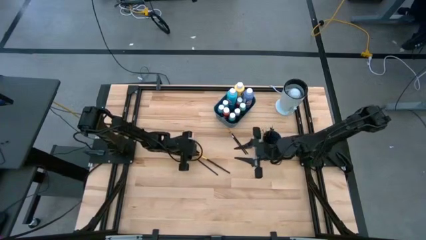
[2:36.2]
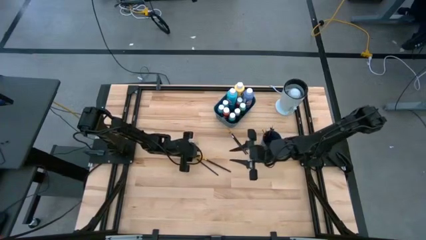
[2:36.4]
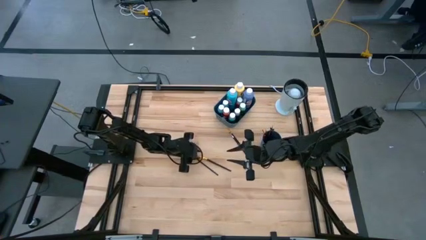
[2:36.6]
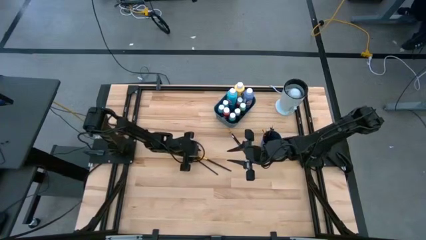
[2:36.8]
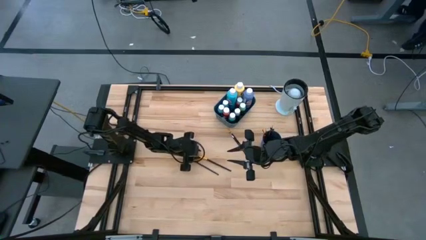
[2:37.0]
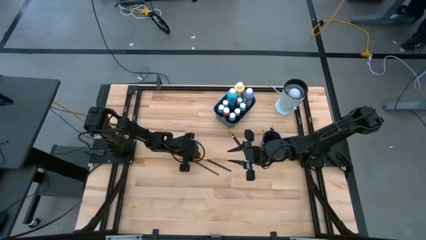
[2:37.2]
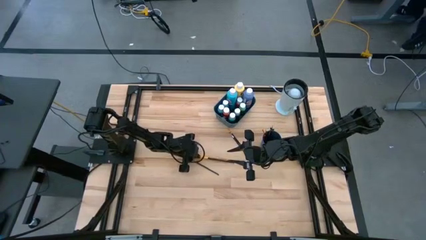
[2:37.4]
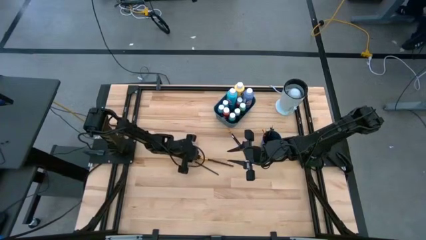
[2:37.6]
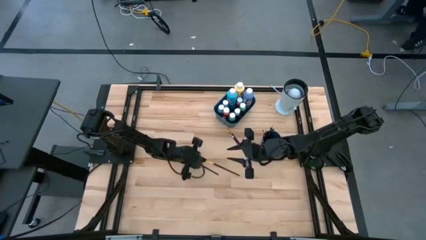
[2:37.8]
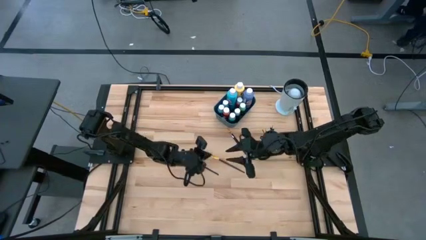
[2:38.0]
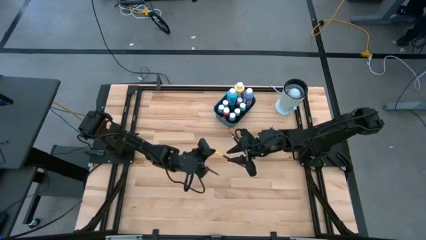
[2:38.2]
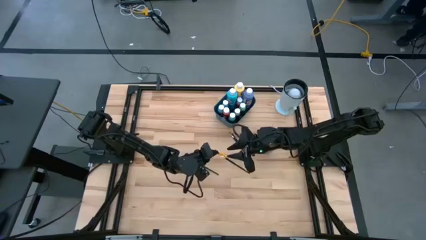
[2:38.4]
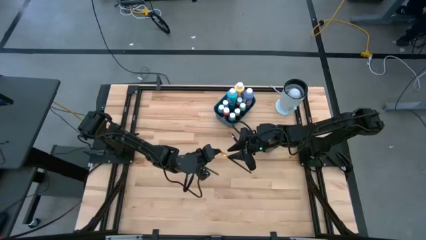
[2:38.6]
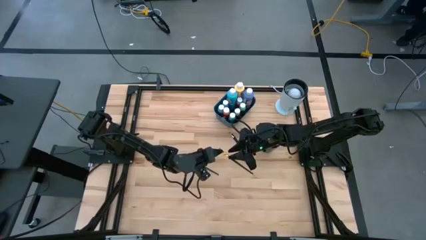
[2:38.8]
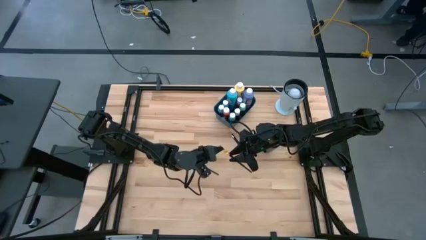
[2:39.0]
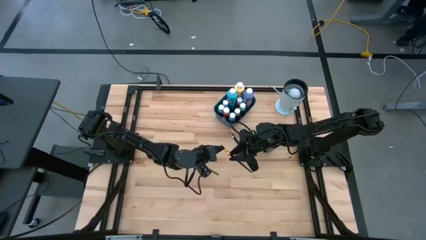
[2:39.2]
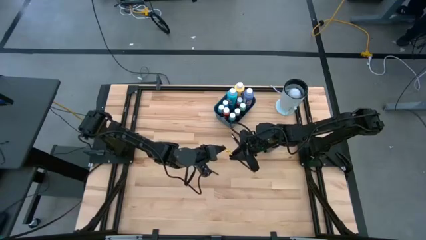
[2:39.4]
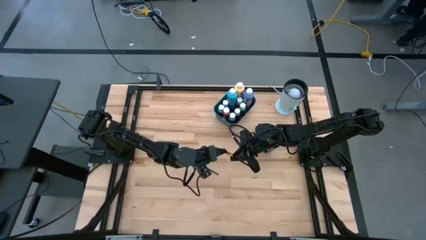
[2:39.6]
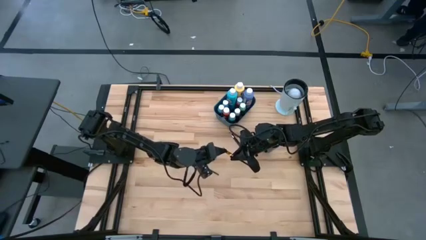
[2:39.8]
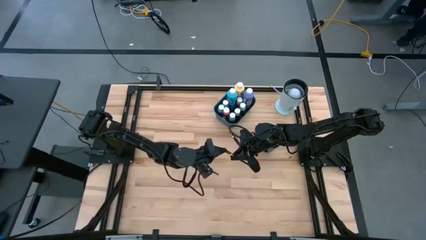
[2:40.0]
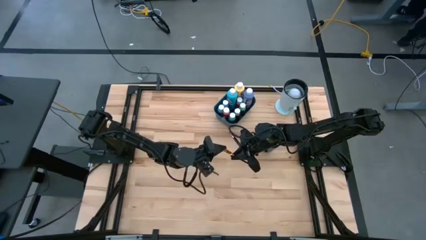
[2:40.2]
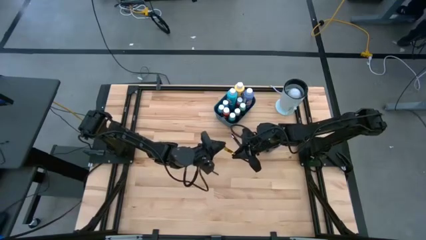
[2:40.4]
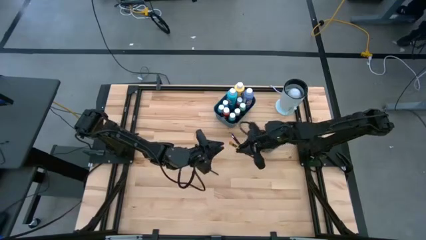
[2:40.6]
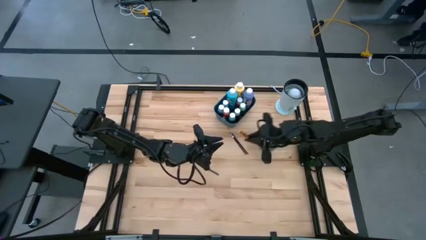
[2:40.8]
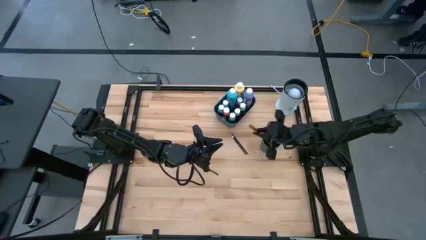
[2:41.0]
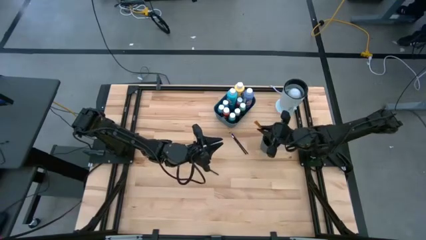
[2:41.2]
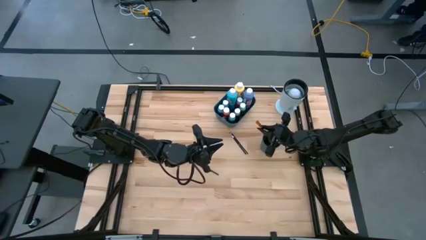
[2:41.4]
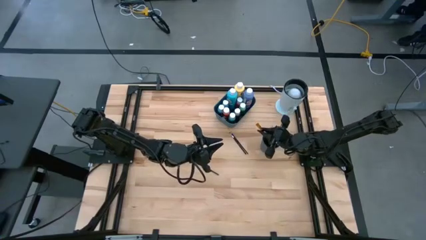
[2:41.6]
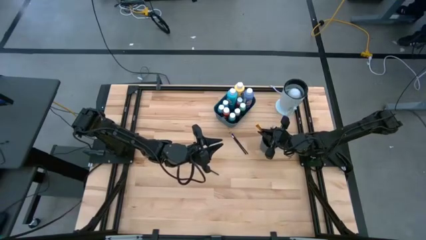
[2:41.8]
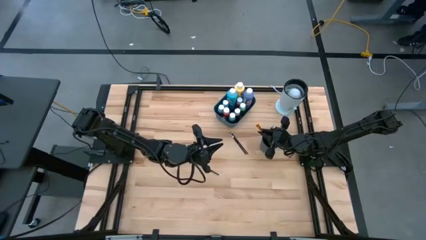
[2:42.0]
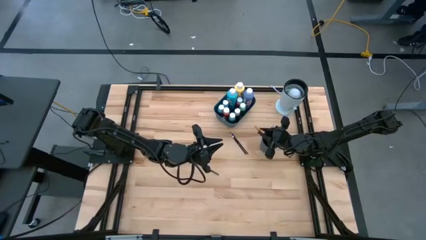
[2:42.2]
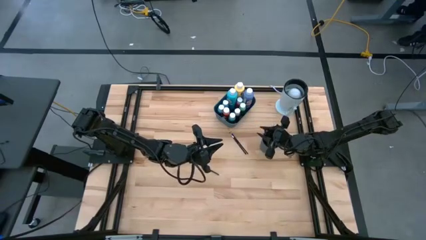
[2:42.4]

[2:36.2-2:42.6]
Task: Pick & Place Paint Supplies
Put the golden paint brush into the blue cup

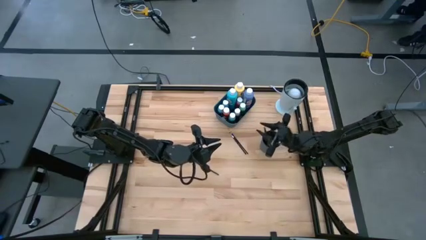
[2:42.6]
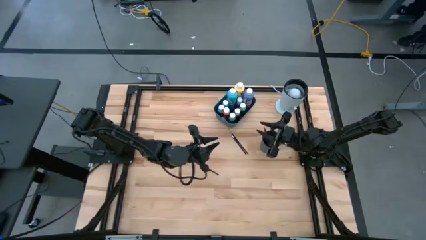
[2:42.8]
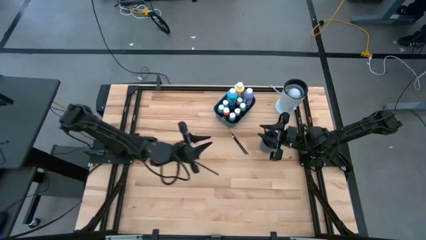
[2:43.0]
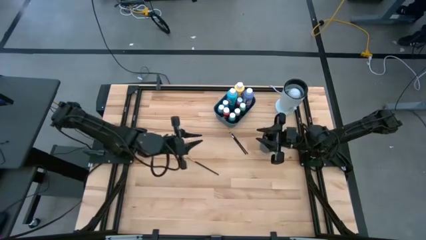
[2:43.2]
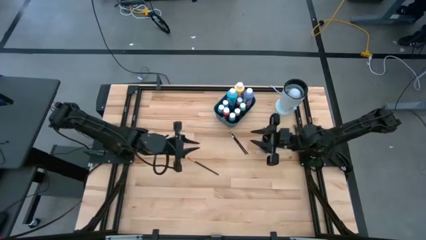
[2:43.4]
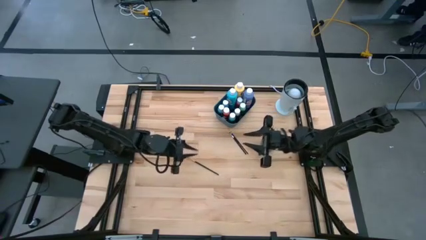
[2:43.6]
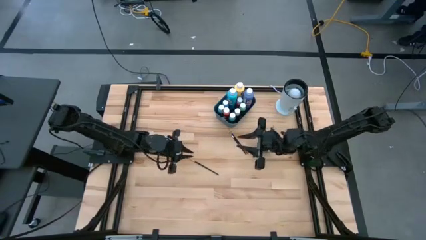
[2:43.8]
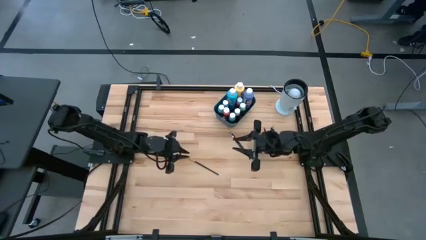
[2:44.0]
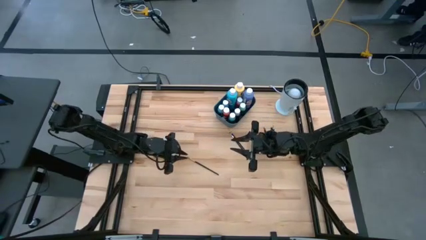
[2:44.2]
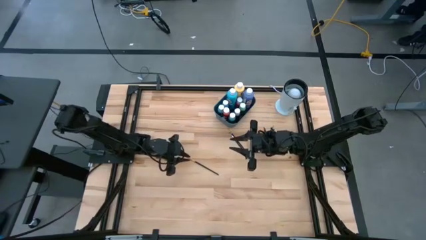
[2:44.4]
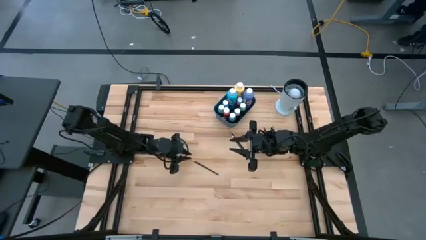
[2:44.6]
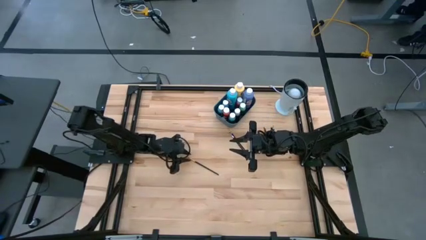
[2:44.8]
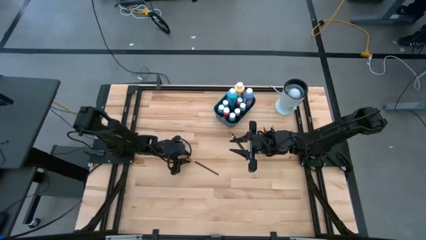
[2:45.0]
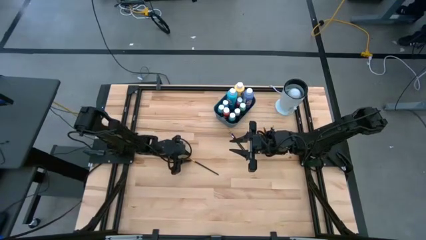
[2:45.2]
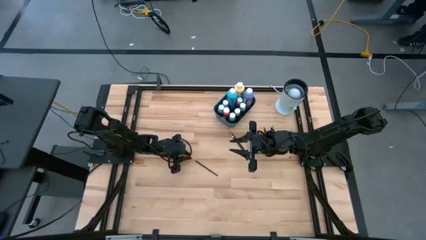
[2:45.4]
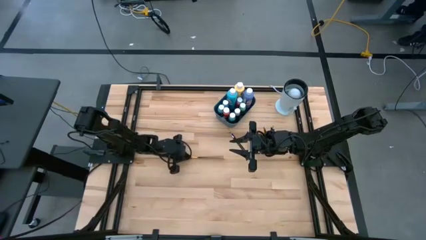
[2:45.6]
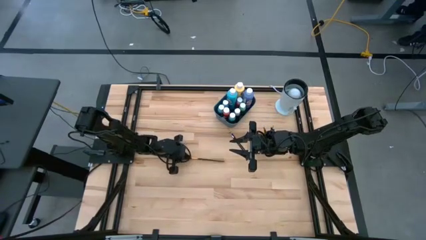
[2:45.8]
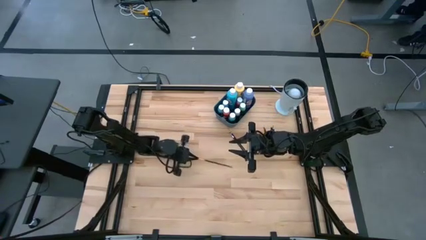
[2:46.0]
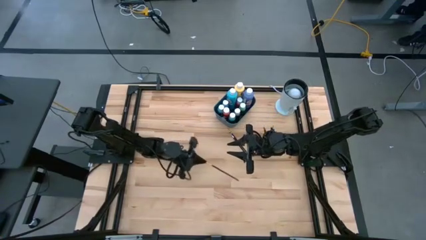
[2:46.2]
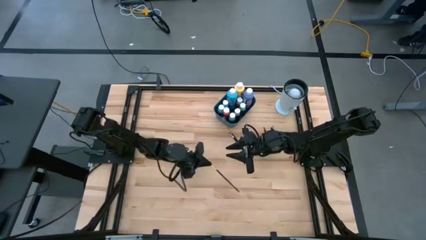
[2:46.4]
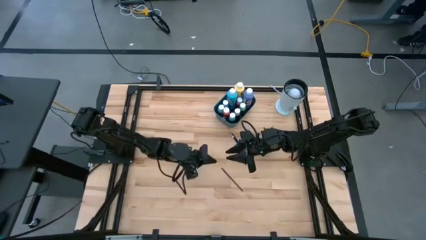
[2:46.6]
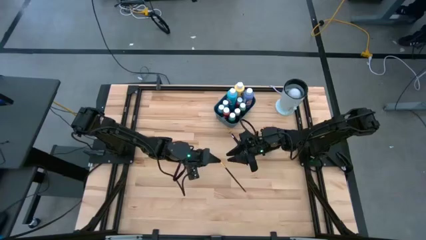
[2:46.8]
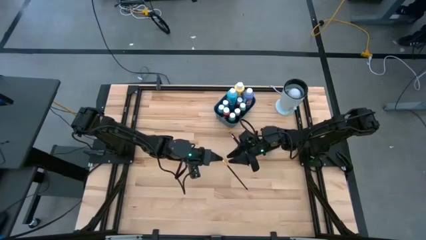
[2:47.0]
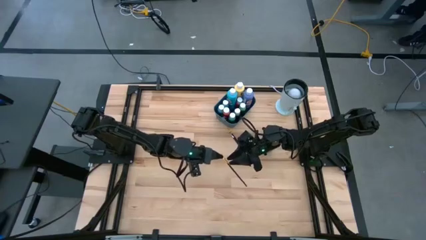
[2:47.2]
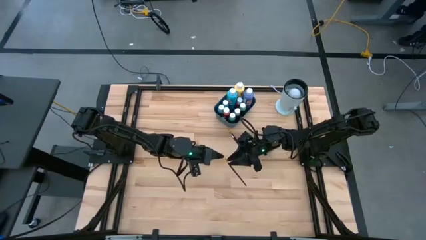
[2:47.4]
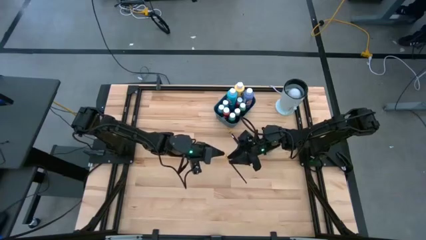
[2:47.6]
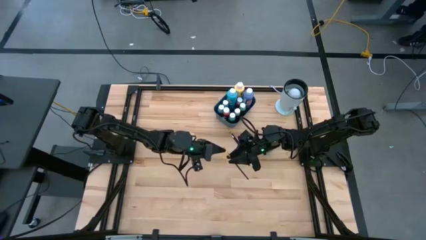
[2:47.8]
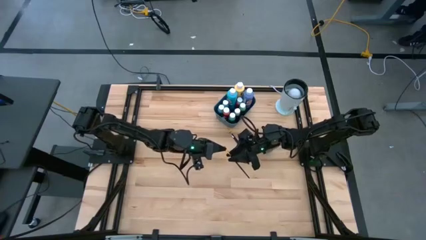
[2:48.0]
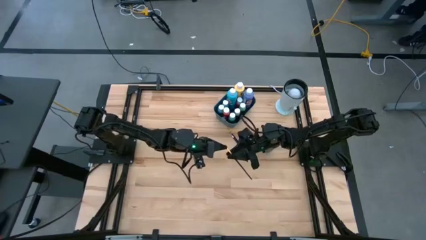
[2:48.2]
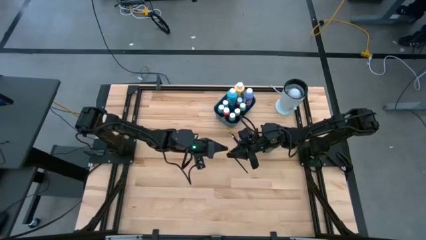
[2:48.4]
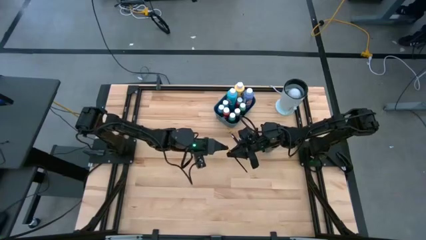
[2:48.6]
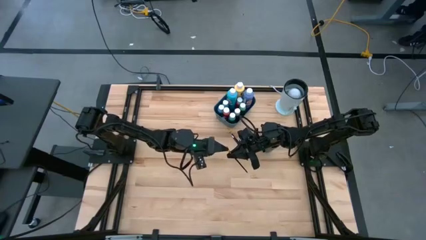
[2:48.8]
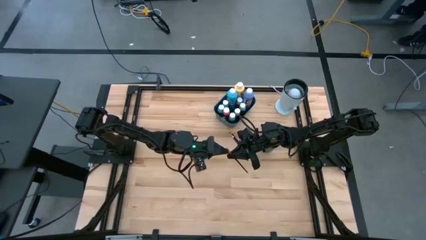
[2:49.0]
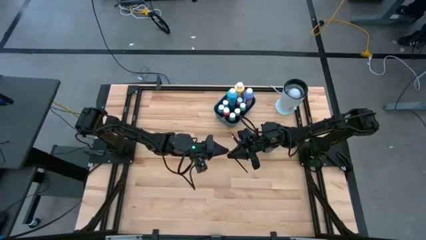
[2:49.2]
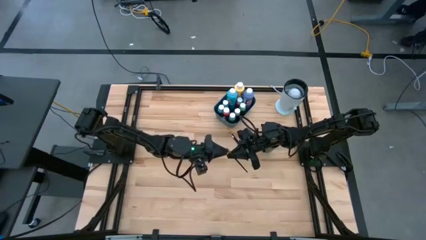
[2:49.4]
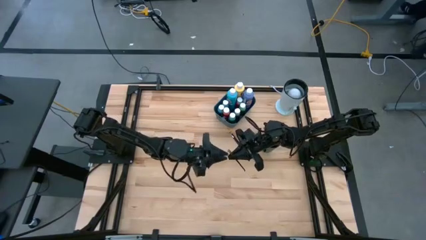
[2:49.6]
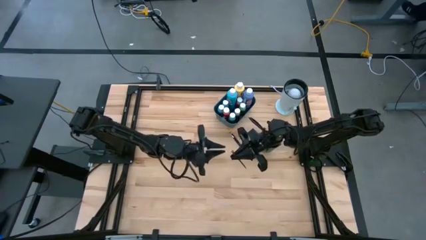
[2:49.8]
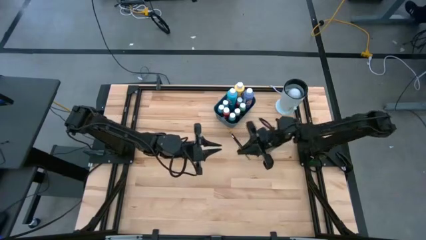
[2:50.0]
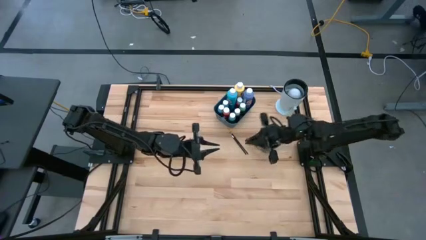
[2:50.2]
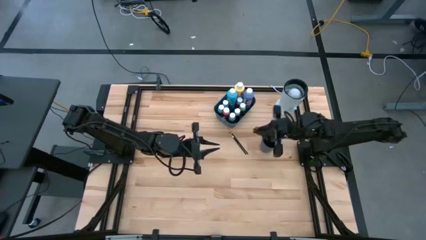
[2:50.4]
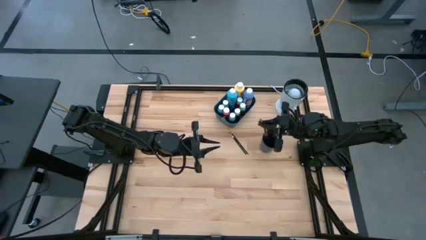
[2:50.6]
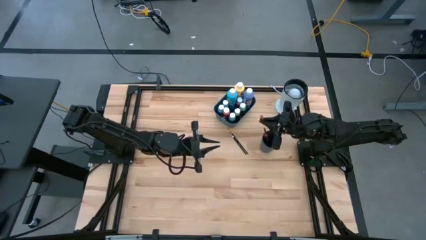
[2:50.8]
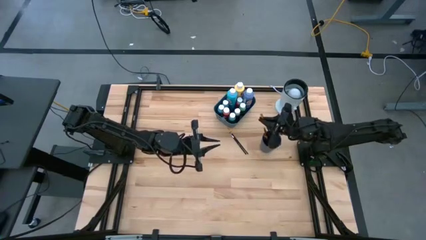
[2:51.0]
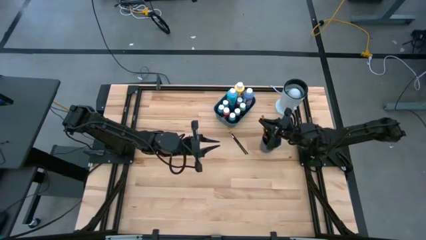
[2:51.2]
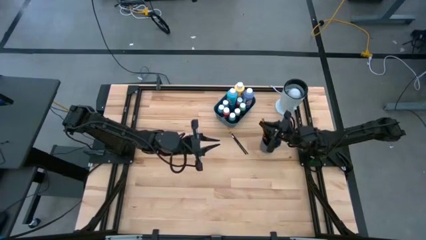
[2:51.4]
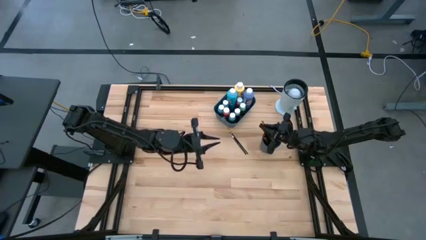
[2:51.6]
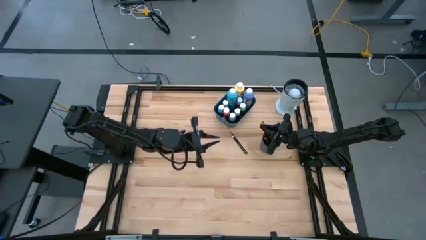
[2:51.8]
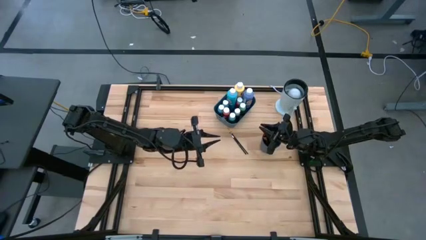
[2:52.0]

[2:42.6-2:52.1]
Put the golden paint brush into the blue cup
